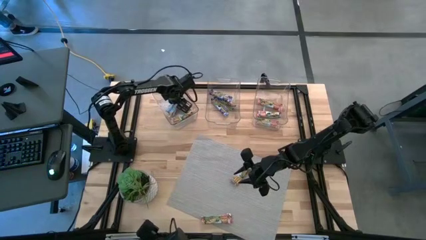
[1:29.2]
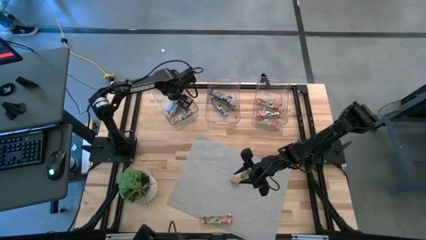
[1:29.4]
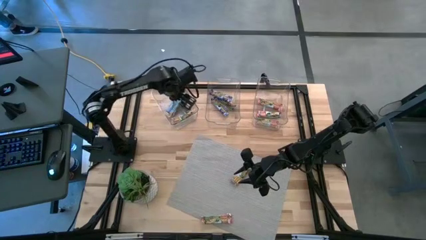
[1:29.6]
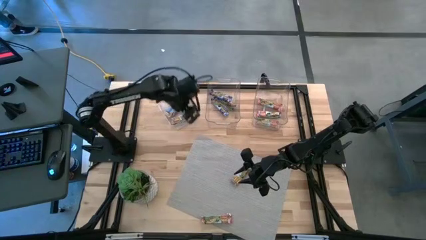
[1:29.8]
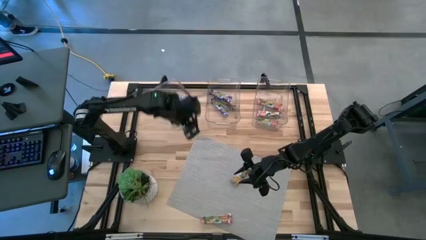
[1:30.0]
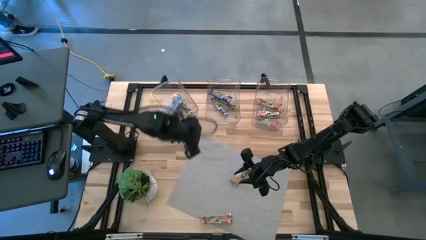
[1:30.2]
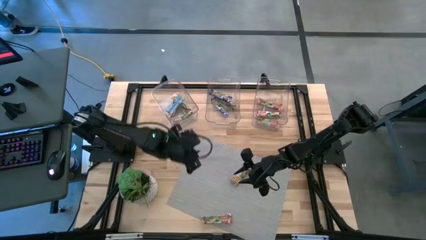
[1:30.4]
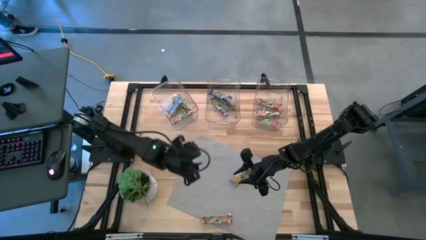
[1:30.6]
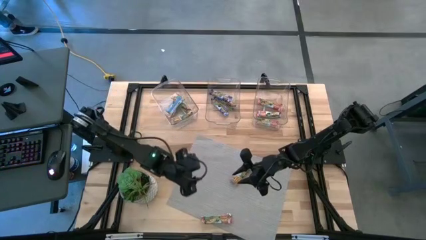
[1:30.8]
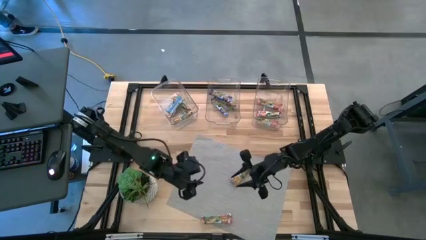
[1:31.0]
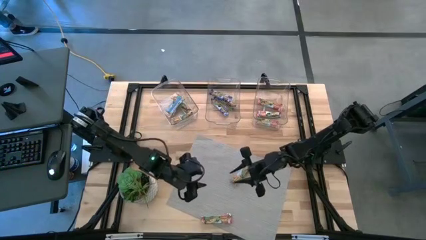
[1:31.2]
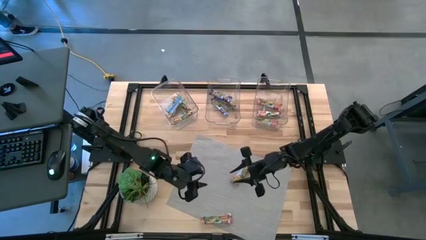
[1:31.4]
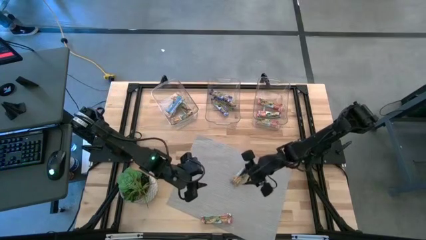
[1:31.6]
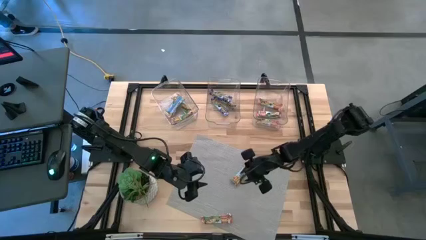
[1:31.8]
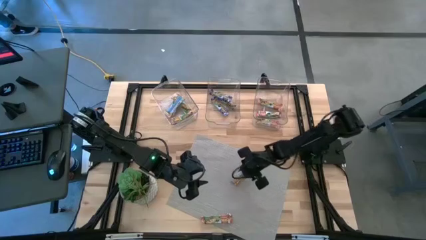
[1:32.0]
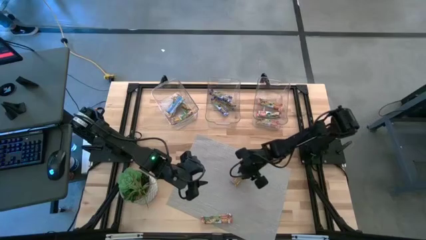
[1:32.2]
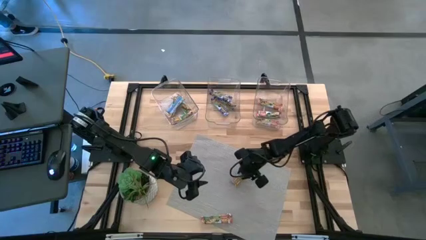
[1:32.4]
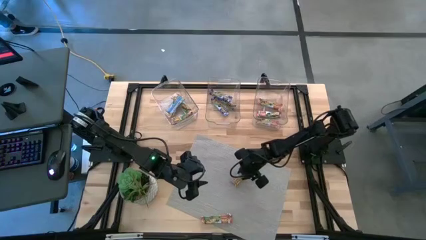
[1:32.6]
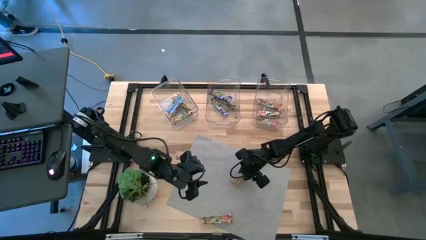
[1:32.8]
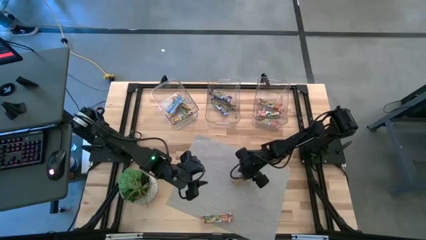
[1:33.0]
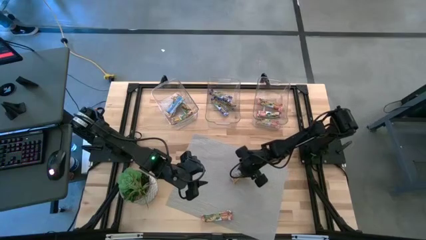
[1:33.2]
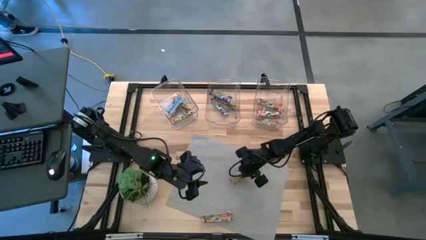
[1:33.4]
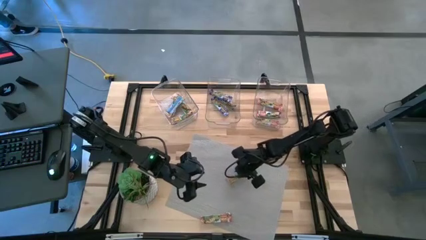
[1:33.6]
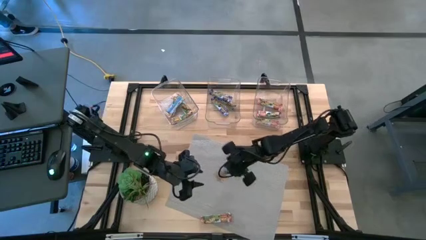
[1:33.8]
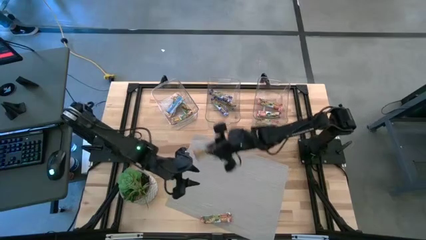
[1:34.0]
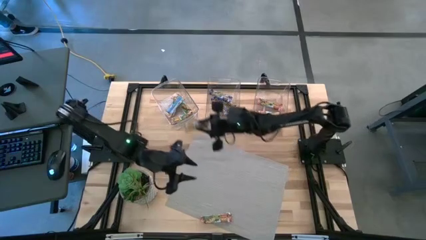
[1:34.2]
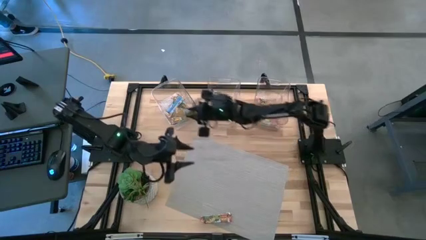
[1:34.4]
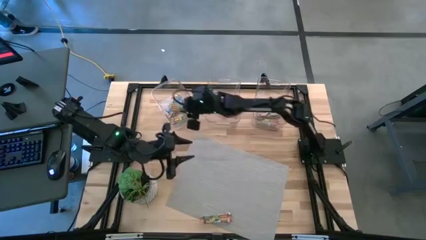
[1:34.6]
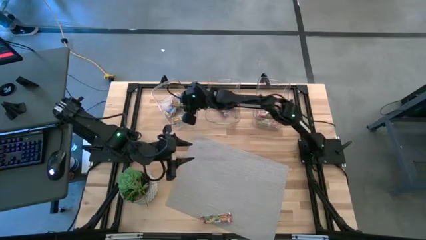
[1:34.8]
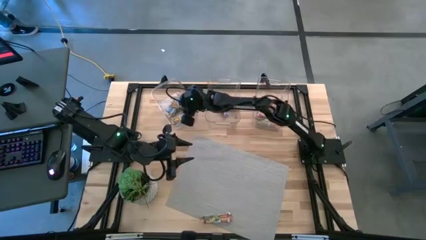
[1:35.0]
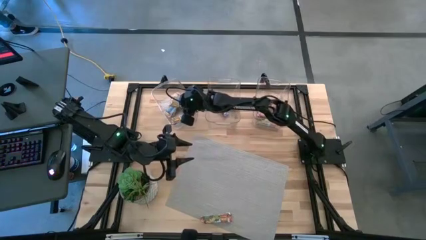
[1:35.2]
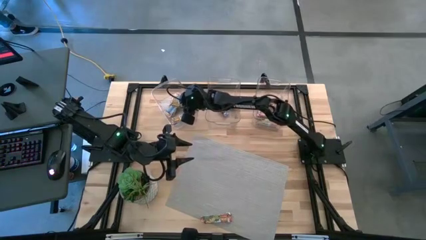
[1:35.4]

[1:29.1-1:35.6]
Task: Pick and place Granola Bars by type
Put the yellow granola bar into the left transparent bin

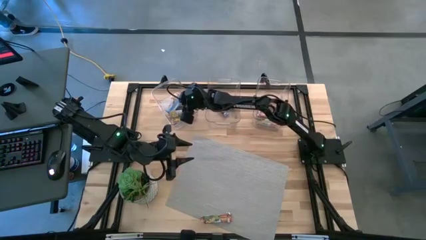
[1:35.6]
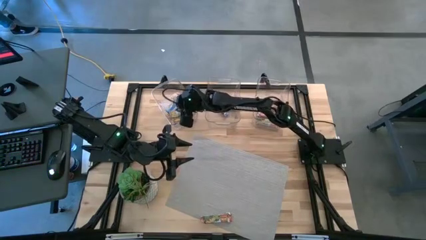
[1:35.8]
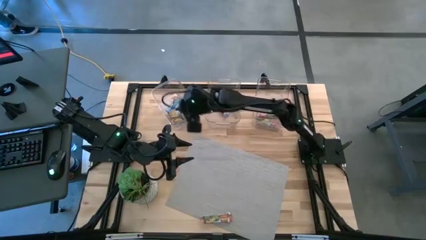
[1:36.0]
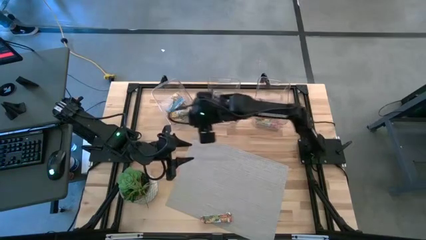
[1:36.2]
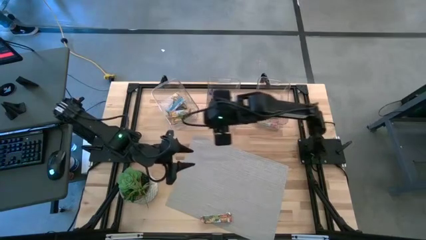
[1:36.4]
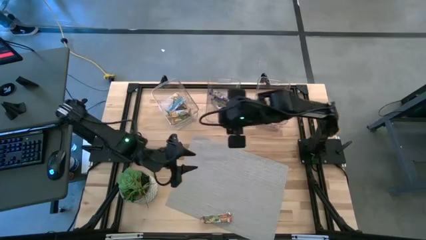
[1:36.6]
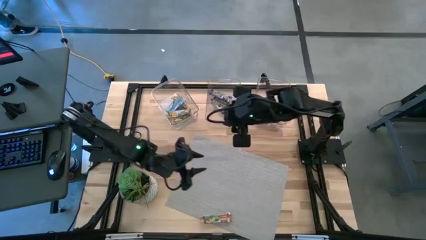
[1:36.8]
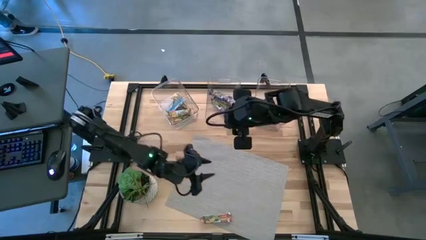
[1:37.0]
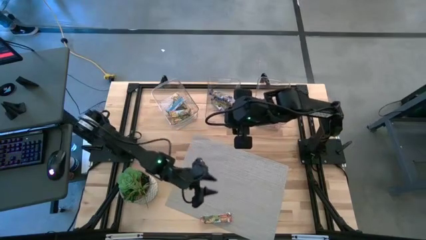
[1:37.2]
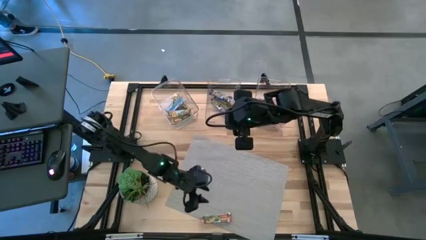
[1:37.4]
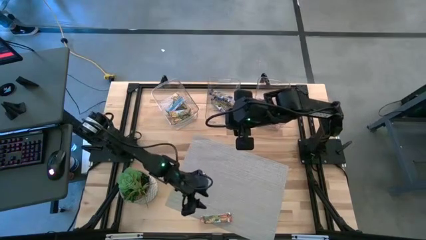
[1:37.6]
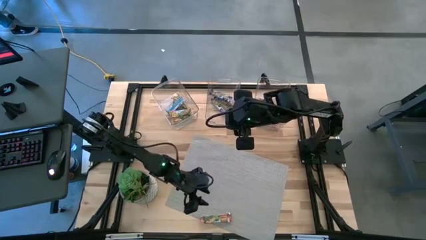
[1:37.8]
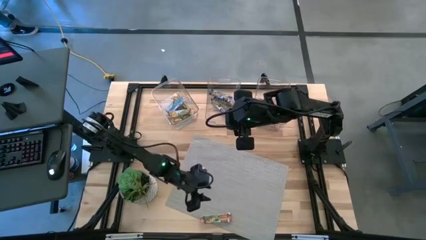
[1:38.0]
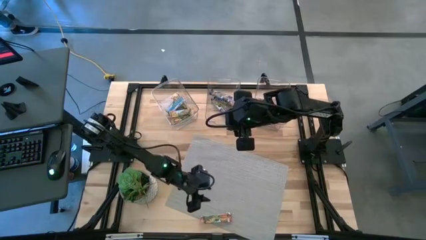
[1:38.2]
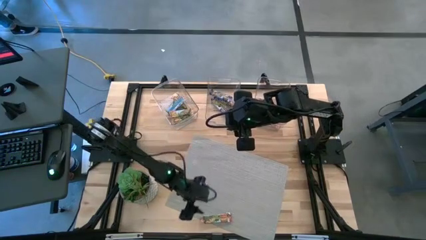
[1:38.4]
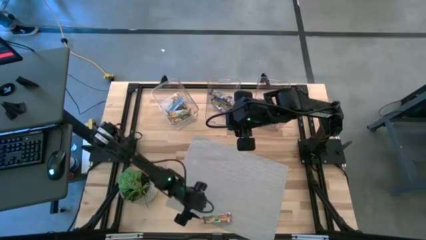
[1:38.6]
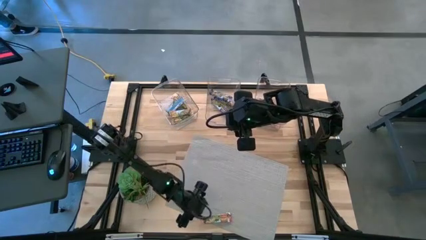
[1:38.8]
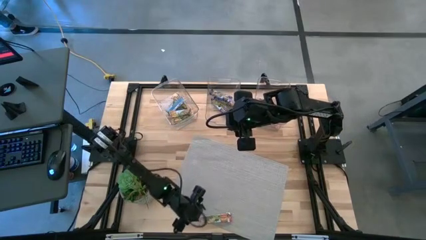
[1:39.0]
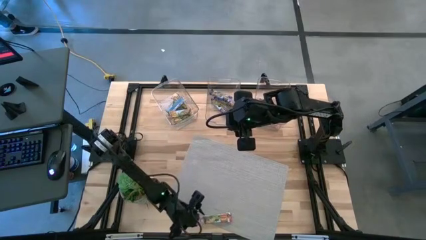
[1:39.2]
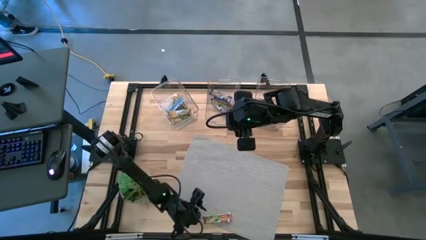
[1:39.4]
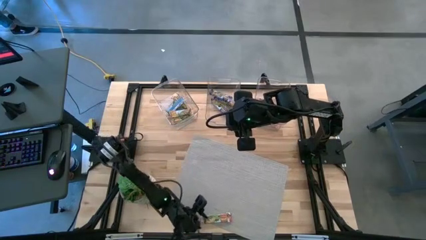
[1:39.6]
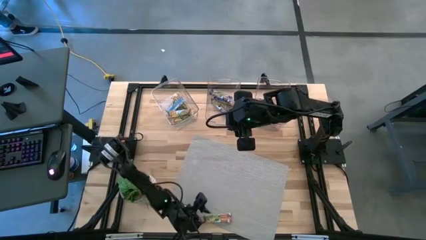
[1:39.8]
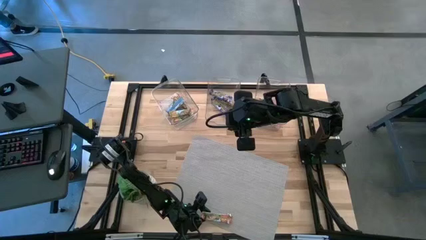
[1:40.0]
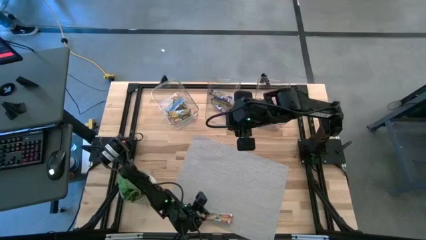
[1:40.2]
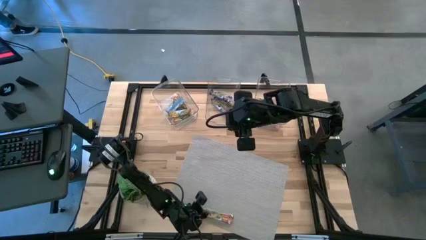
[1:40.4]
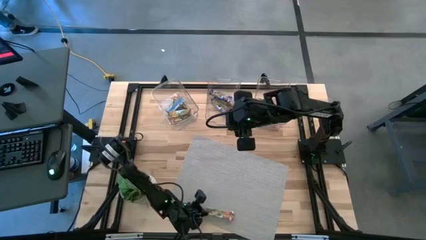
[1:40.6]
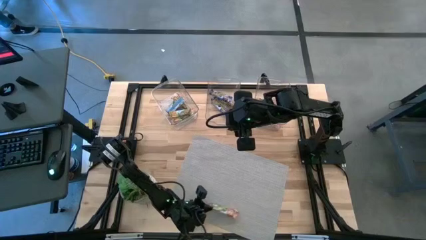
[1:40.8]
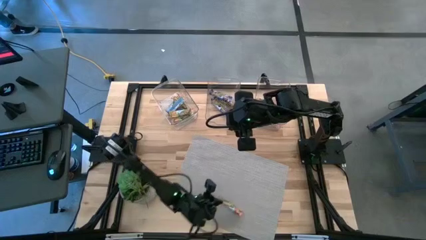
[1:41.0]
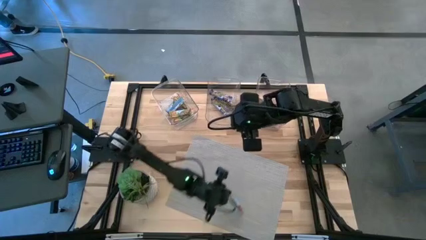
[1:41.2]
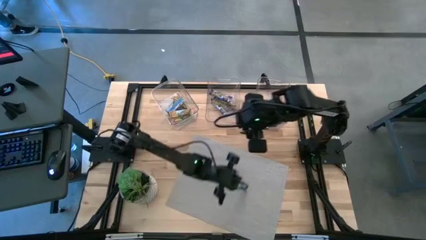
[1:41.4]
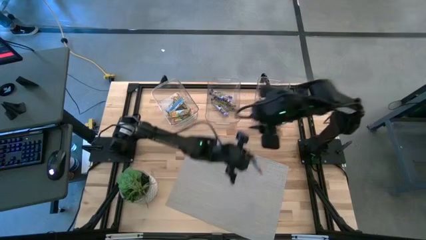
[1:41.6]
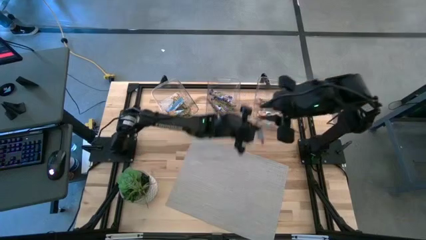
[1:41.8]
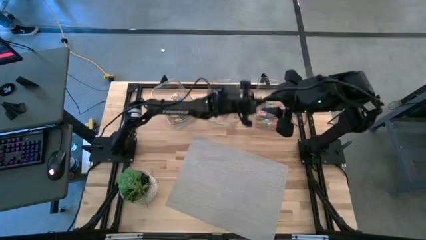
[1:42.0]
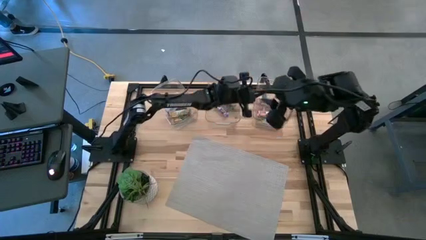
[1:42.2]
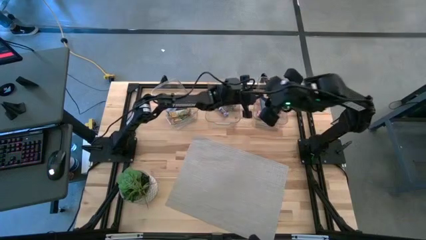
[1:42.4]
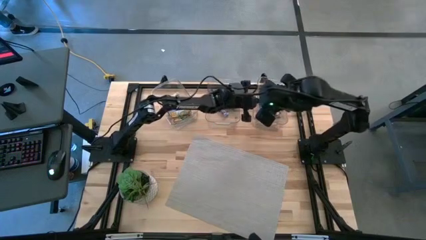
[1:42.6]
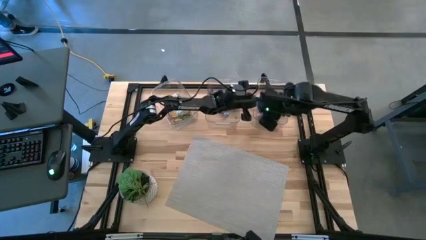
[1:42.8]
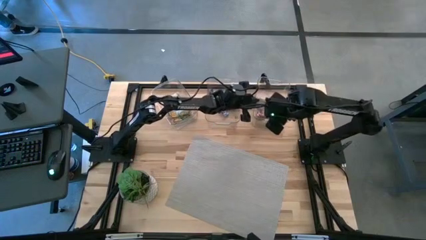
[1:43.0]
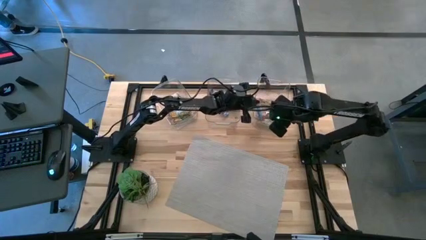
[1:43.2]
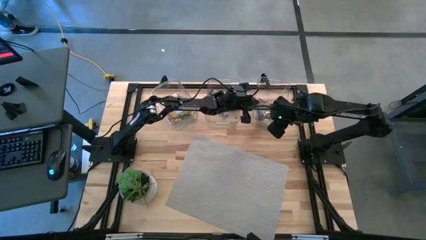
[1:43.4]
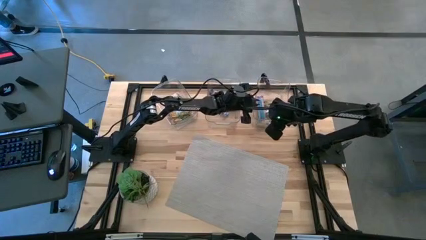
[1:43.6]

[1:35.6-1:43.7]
Put the red granola bar into the right transparent bin

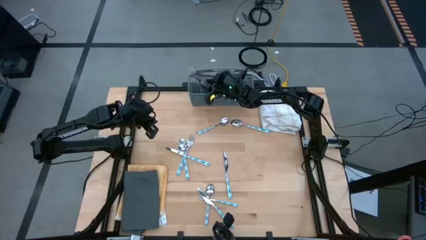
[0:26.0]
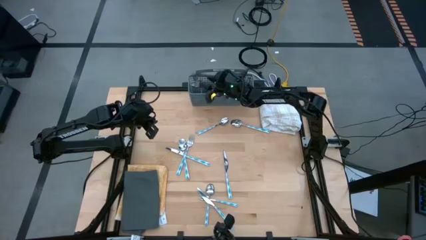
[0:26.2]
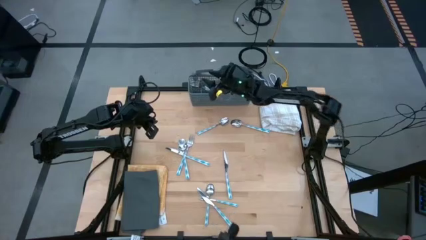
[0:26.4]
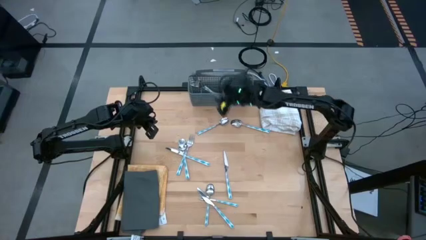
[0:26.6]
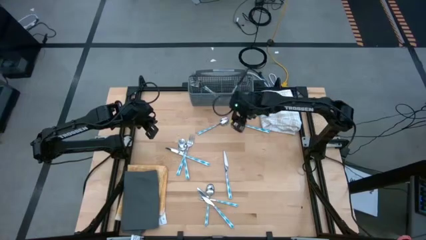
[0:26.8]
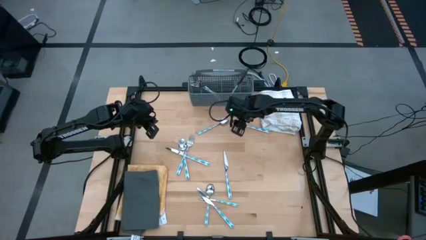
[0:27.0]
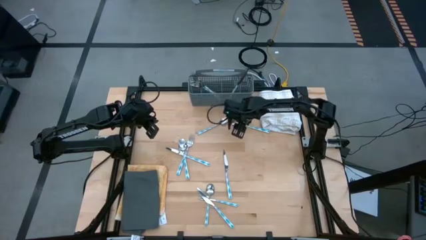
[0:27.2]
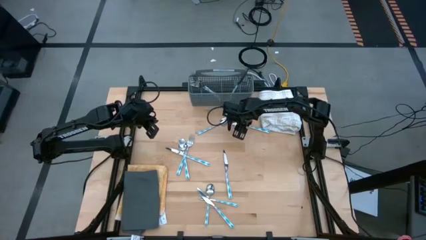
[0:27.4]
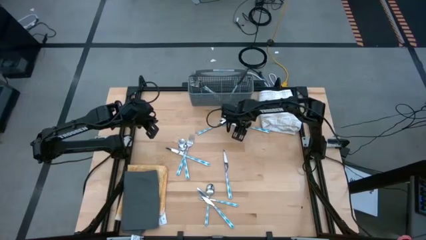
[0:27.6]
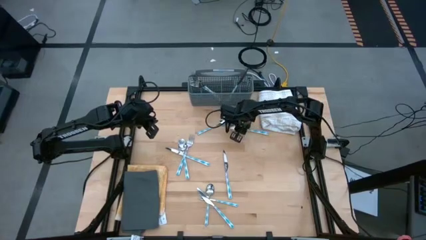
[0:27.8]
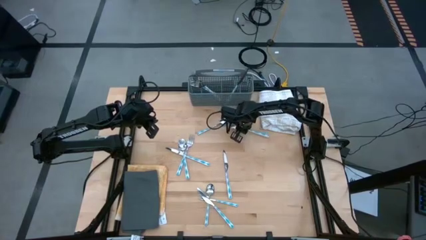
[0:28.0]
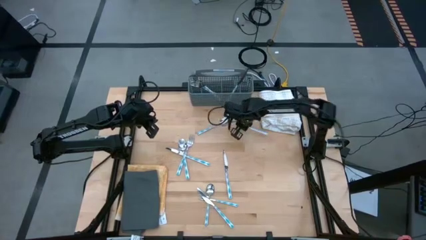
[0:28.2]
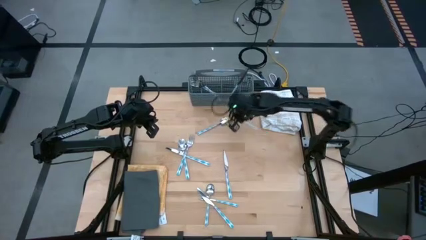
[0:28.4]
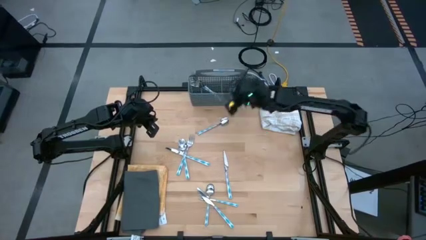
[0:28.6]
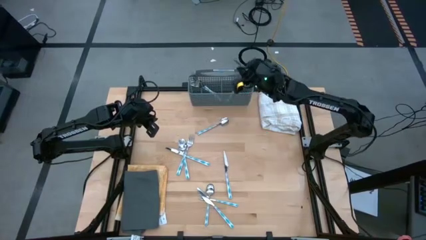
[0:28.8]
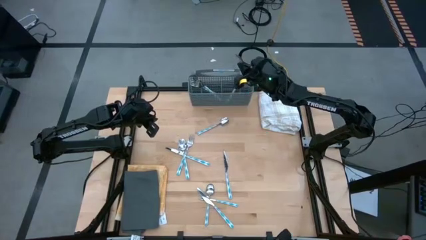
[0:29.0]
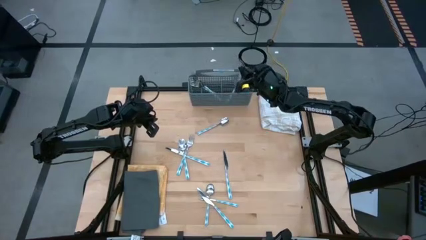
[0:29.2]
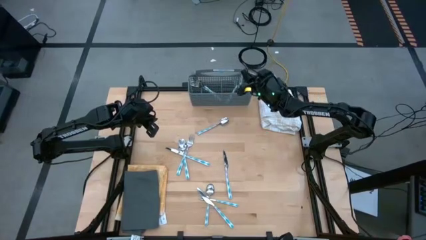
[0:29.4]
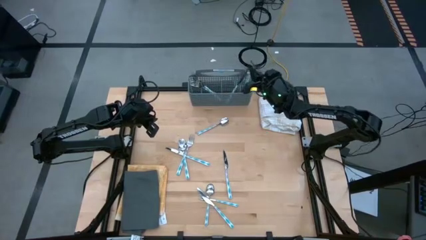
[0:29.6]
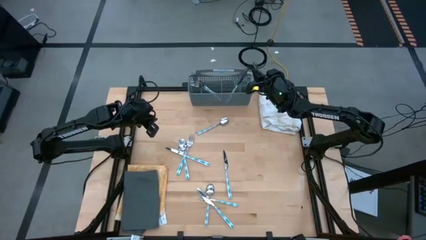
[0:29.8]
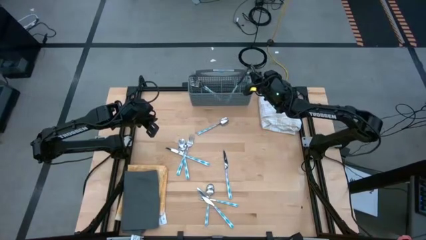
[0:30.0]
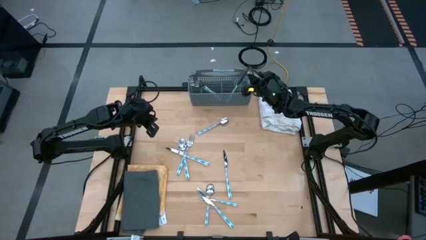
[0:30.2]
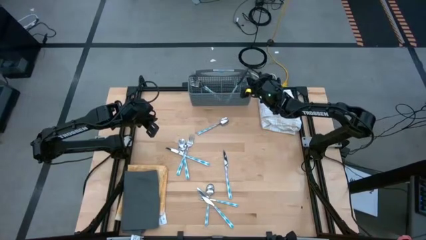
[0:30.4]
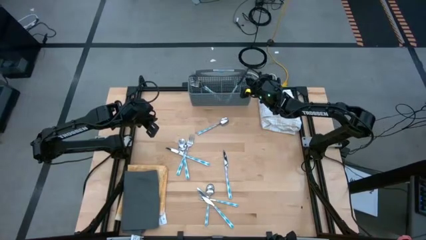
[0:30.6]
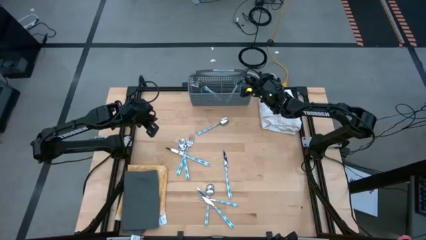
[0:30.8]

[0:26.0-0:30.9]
Task: Sort silverware
Put the top right blue spoon into the gray silverware rack
